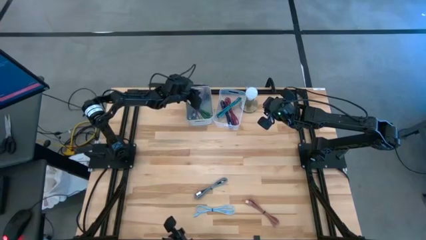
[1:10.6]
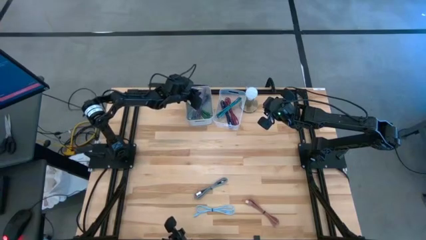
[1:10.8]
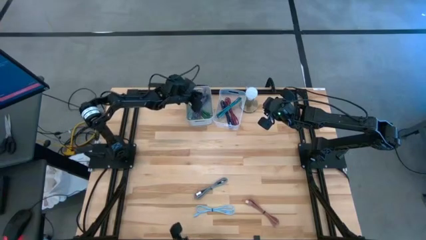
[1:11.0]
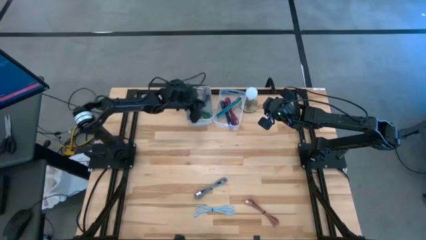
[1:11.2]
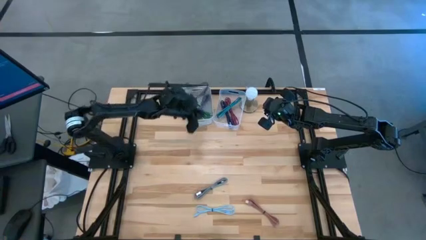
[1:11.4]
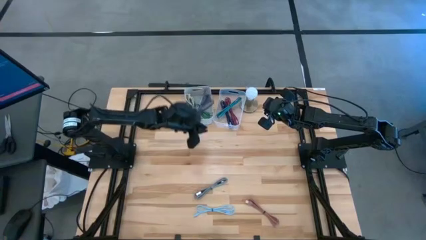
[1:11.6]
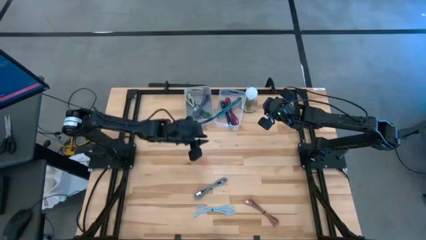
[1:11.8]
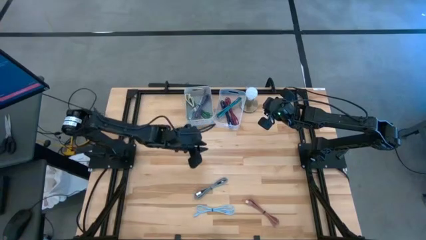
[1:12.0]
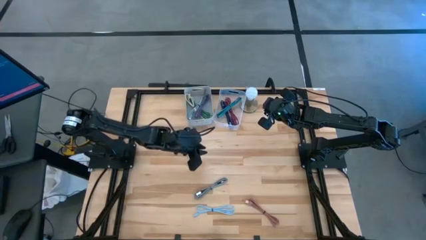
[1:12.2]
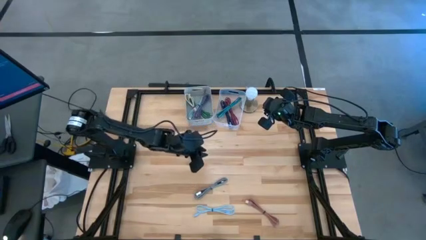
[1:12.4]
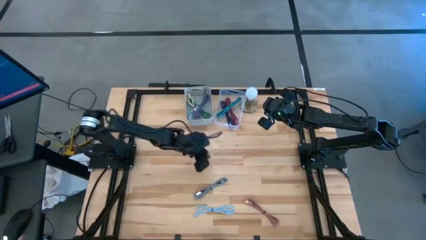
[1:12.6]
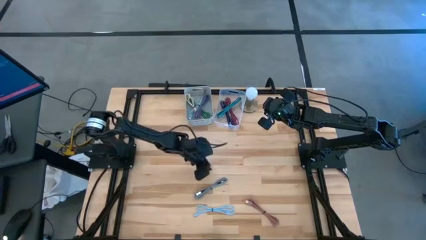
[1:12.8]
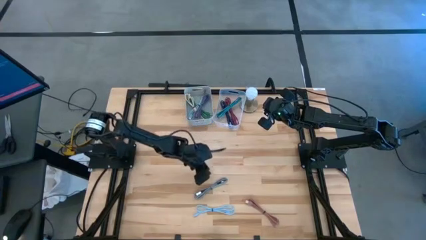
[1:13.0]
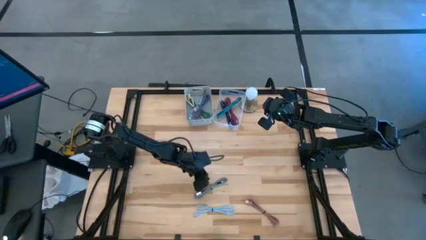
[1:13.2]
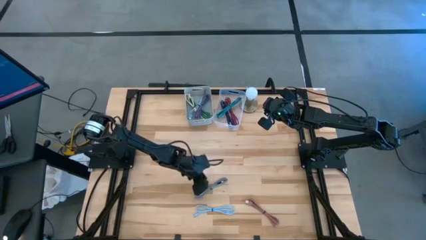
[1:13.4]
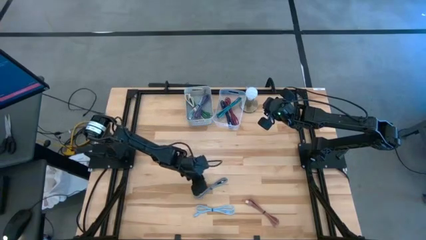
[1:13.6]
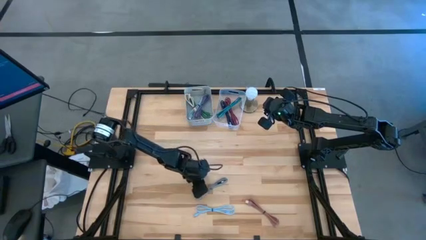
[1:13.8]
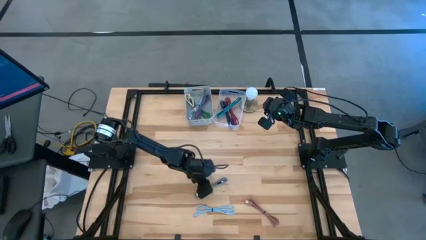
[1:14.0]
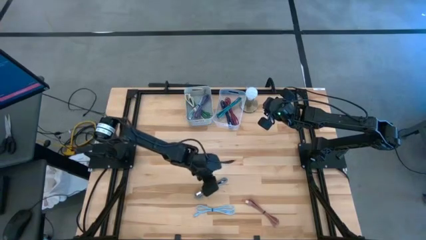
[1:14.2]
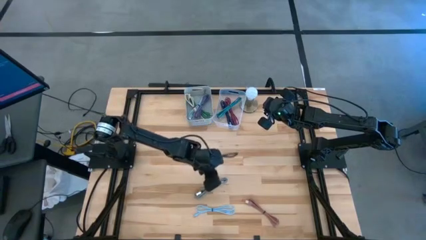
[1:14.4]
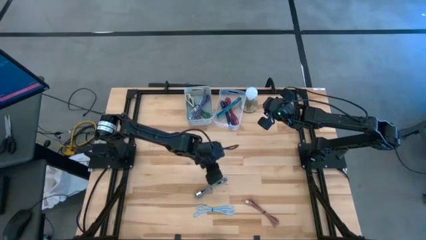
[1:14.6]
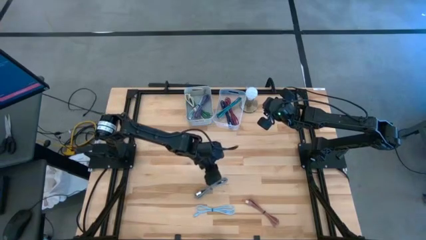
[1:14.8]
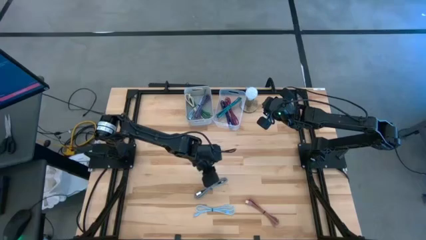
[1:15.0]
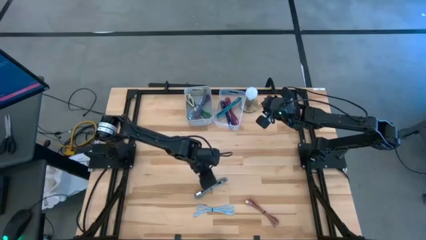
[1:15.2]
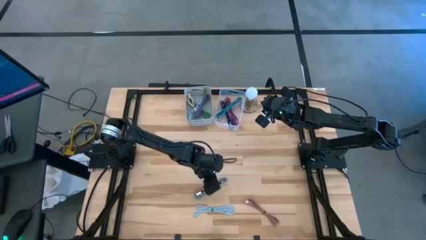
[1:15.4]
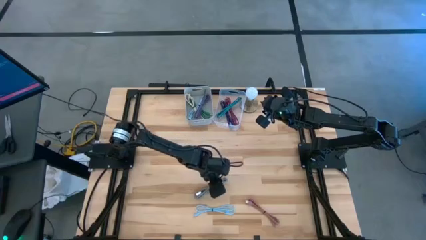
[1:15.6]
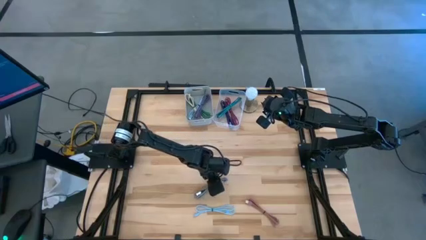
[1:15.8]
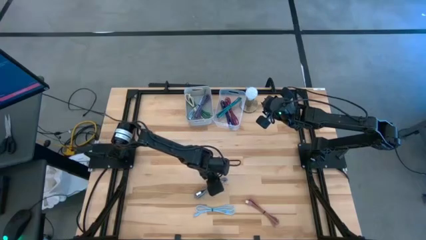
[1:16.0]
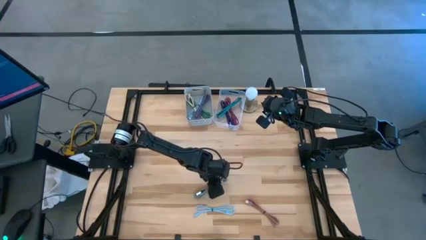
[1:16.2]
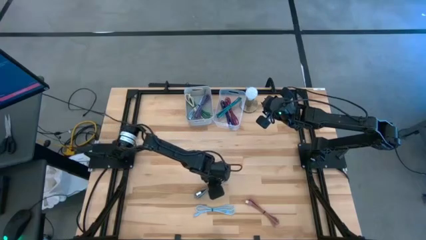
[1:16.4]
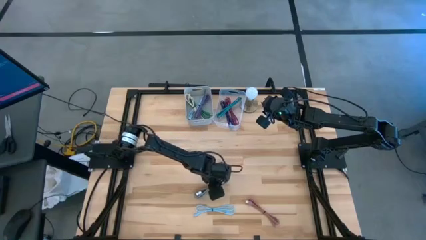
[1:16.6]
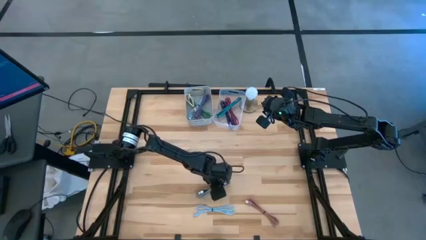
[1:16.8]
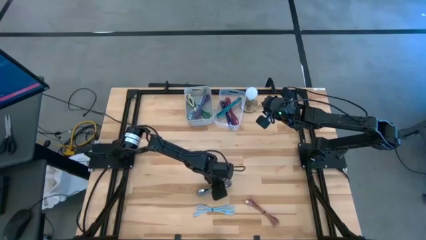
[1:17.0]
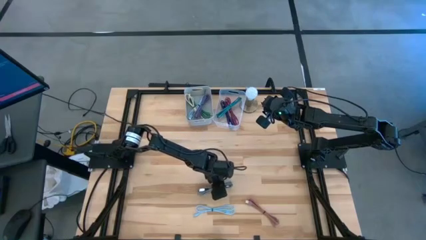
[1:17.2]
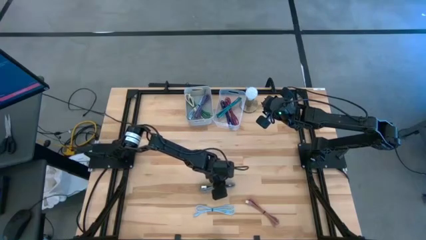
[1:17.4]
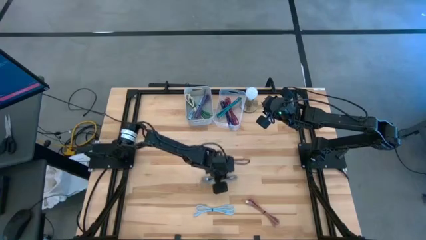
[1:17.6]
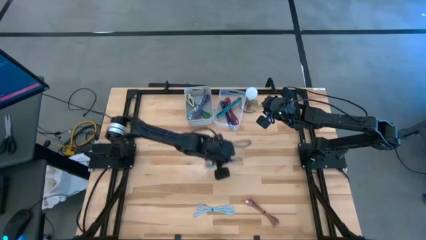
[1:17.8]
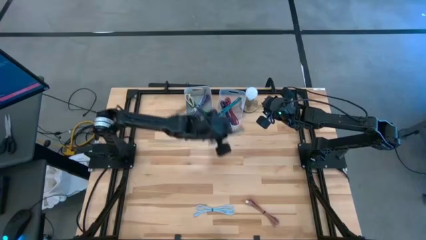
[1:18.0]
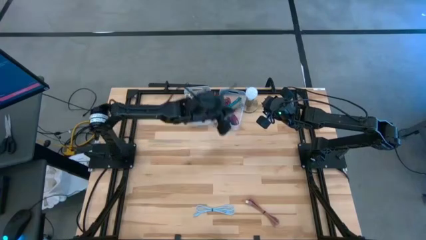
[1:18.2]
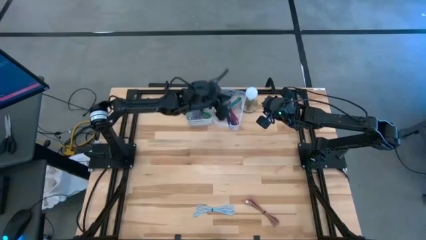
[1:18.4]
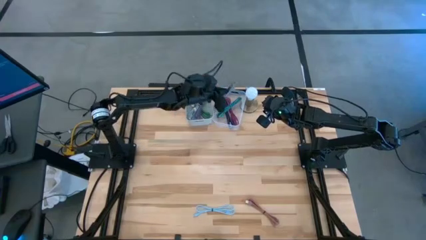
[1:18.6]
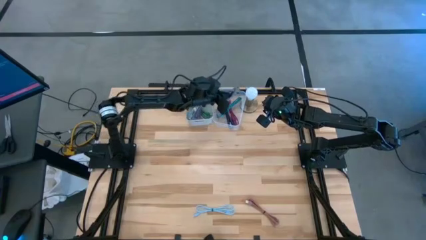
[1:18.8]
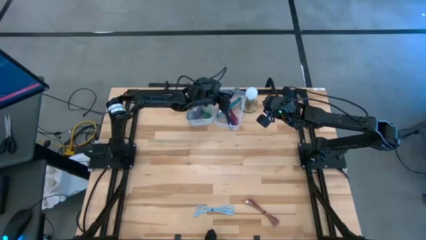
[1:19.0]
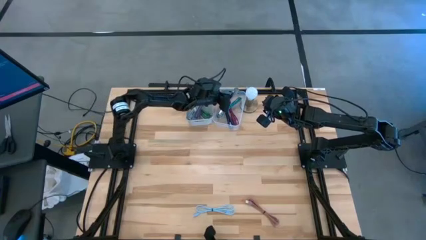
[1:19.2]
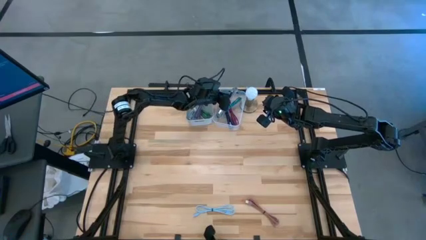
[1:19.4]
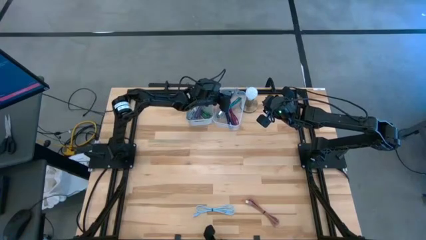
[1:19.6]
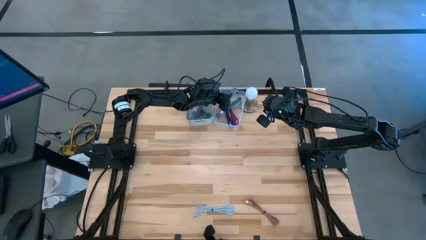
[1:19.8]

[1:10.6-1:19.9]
Task: Pick & Place USB Port
Put the braided black charger cable into the transparent bin

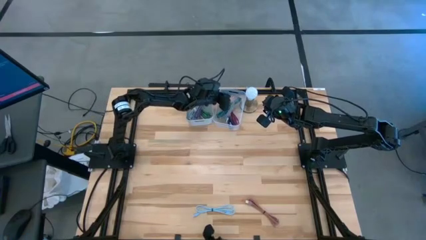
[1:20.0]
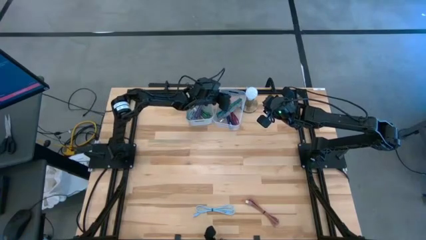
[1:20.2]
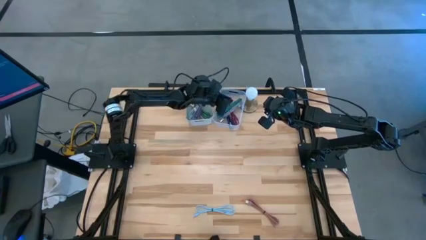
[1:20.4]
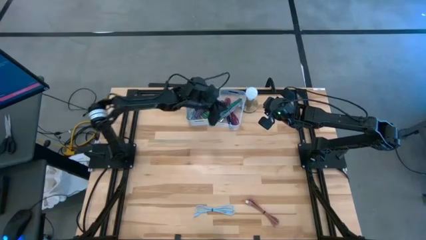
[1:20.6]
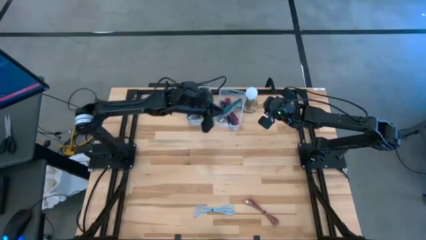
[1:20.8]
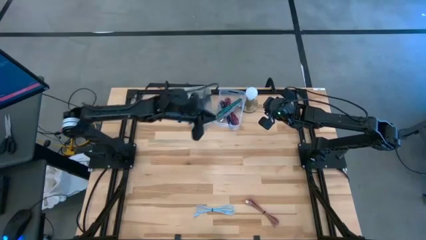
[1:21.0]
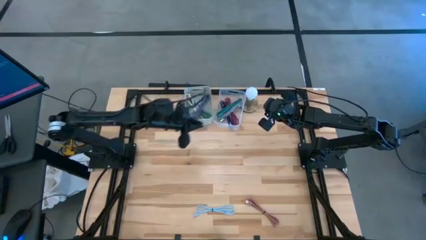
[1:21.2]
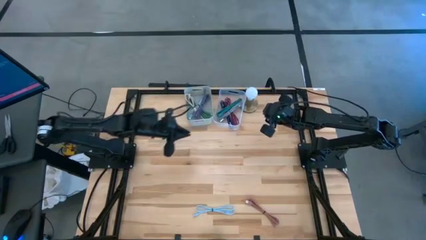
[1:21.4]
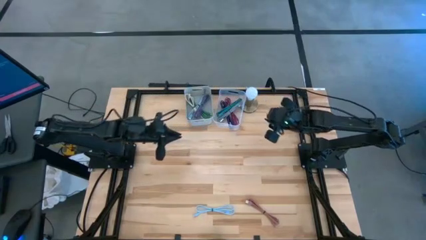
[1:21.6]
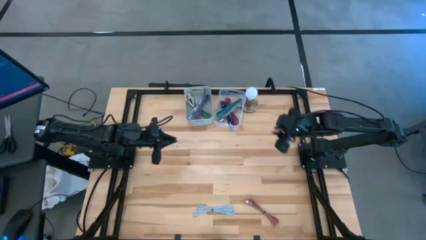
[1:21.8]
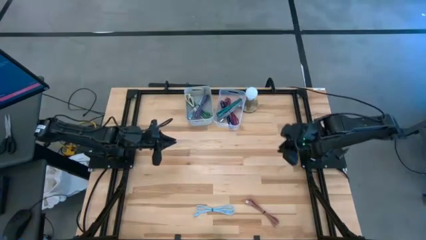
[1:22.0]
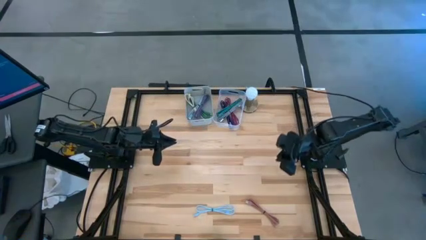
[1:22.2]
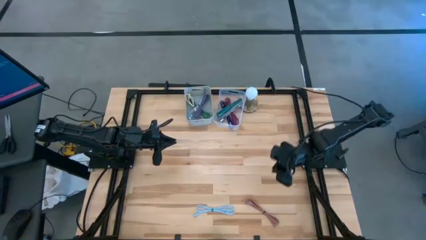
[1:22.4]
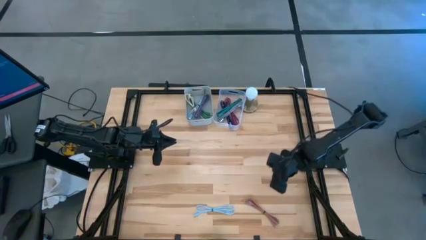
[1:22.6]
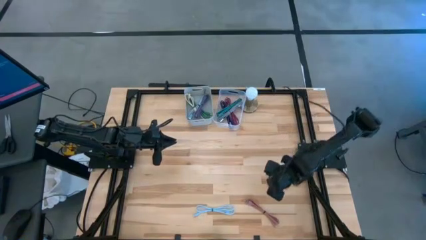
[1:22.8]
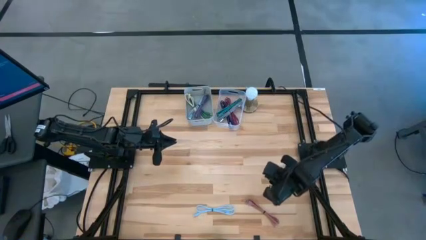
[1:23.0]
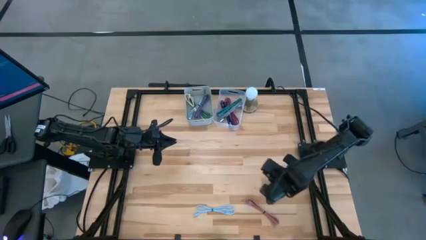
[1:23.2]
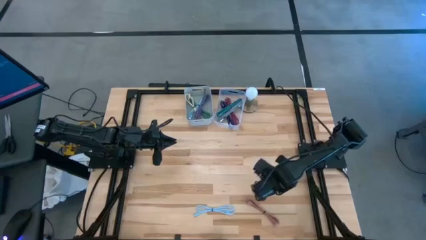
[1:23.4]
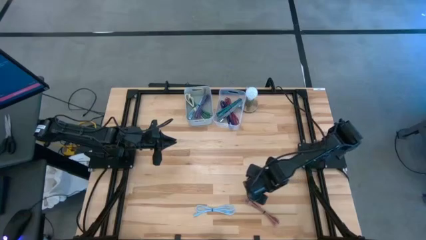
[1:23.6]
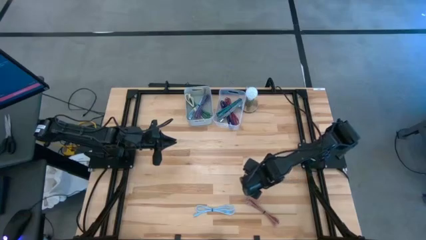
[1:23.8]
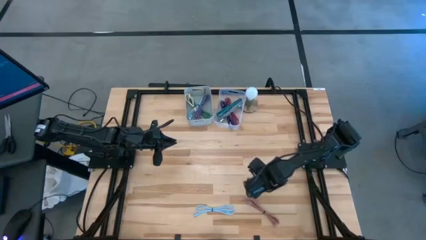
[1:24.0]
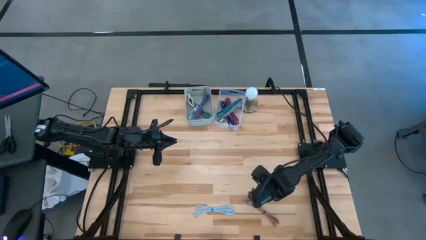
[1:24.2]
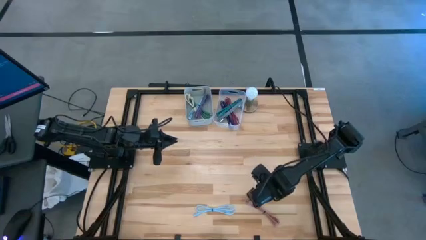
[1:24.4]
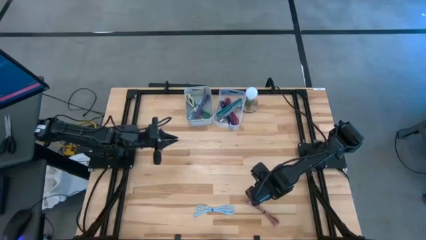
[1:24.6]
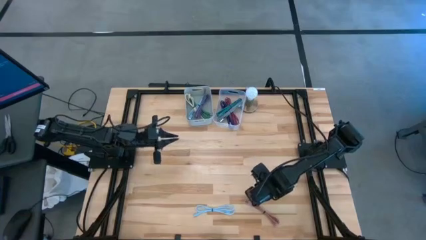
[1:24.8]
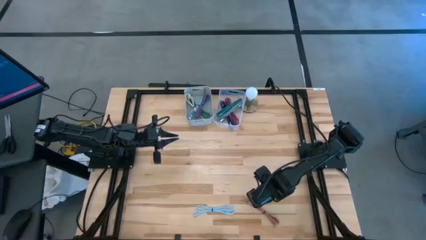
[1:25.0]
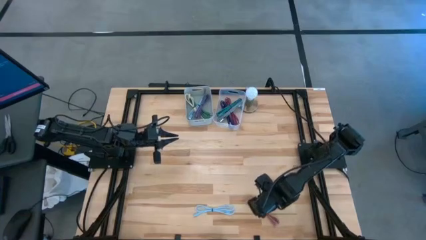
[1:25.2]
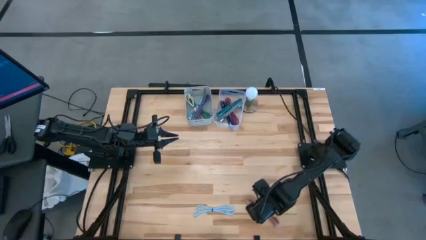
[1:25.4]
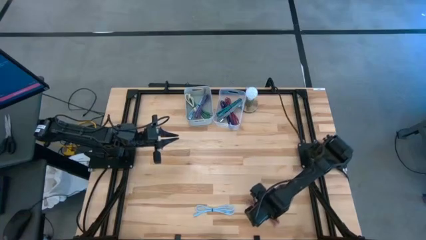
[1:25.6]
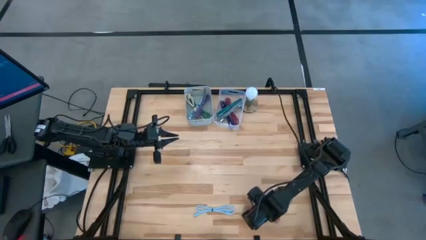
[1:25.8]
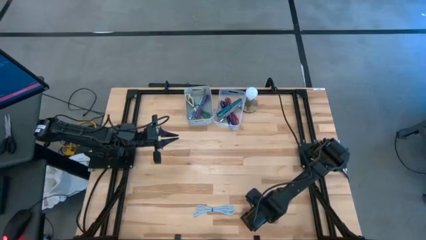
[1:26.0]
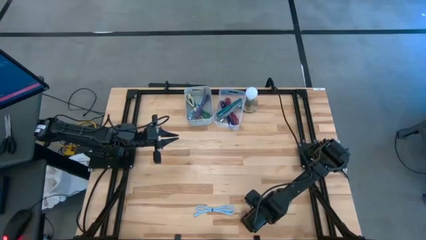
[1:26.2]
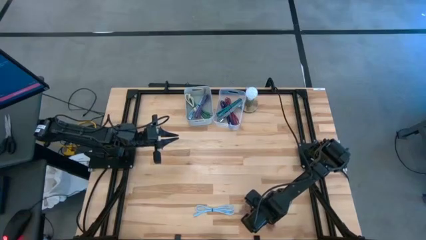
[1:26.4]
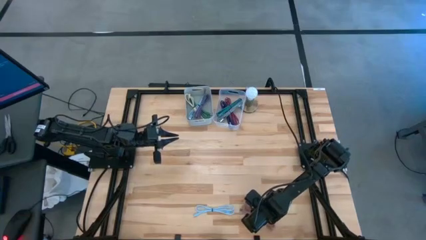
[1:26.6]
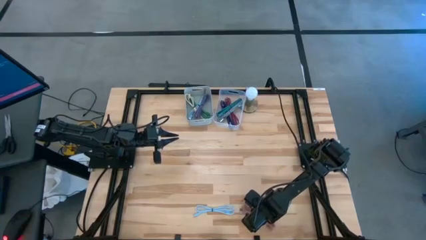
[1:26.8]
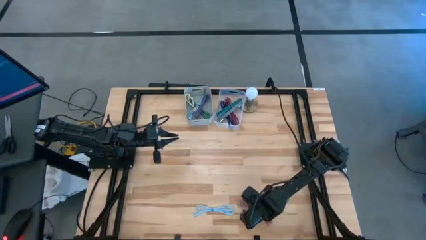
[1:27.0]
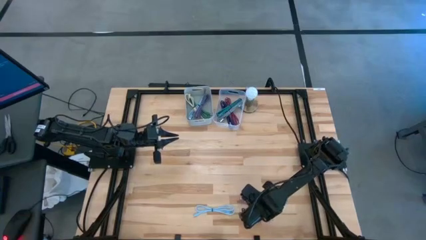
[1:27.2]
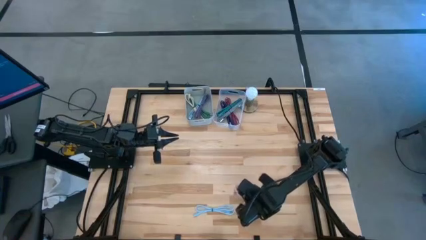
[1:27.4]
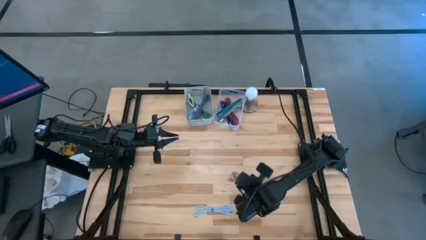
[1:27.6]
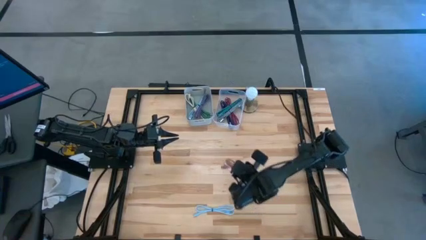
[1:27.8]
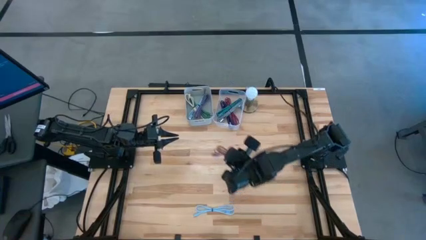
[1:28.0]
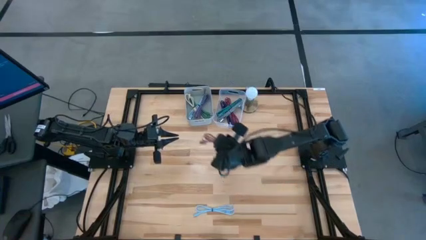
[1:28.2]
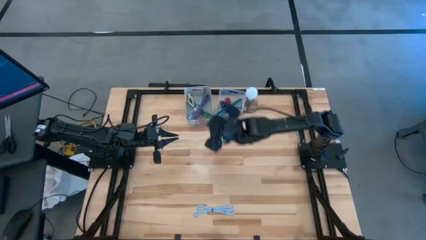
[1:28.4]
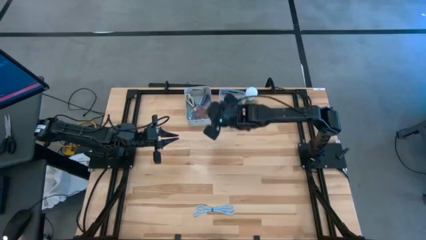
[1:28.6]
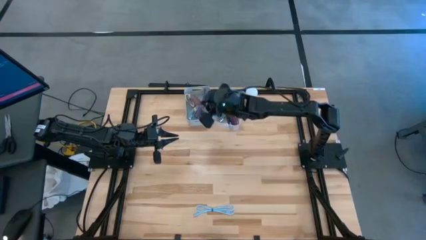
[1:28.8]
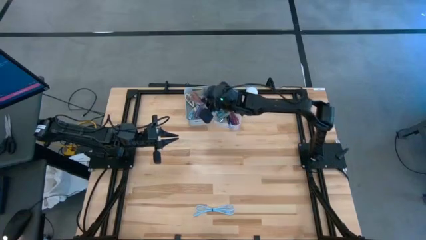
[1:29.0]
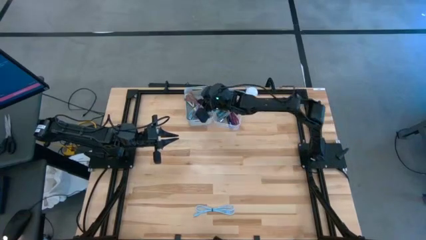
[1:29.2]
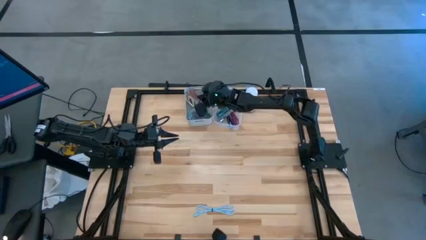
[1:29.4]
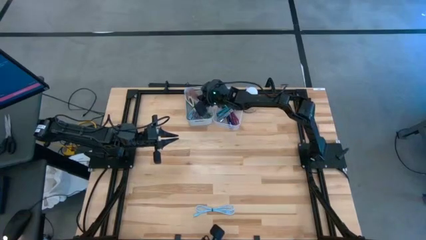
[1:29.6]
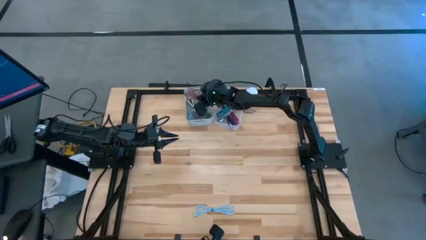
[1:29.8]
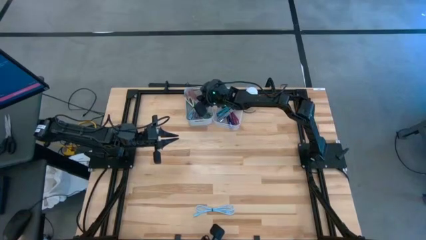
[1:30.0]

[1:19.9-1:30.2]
Put the pink charger cable into the white bin
